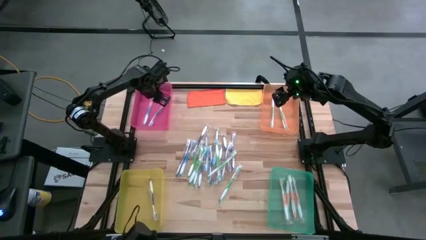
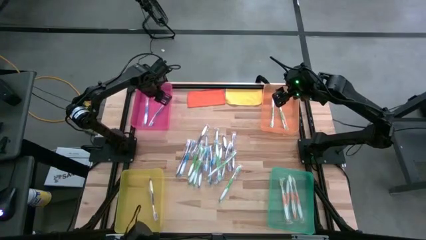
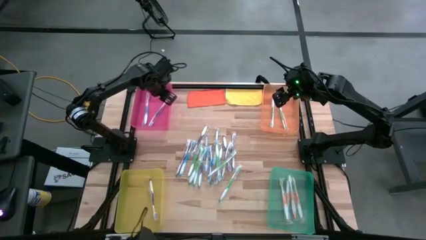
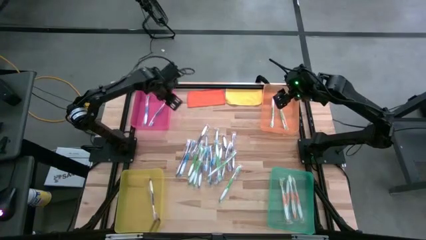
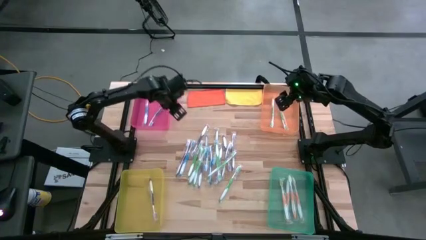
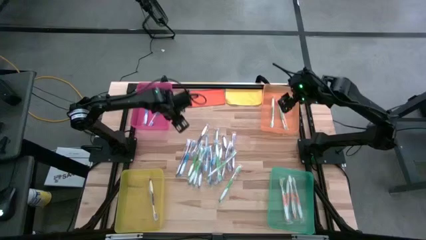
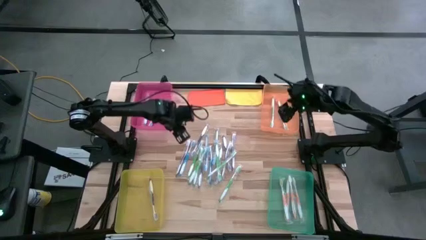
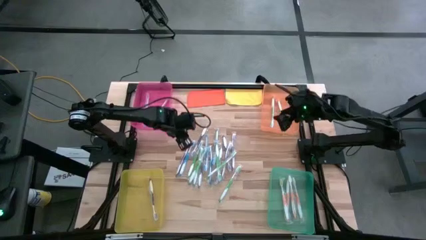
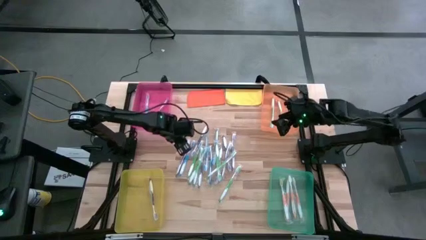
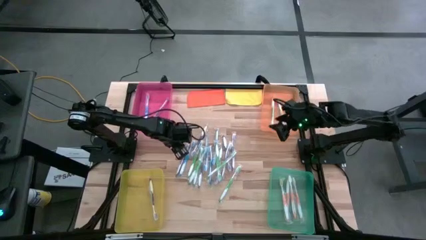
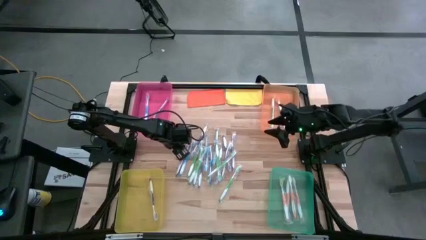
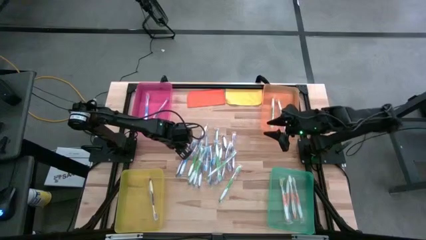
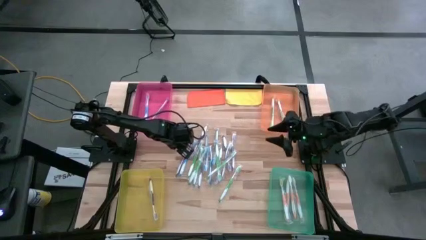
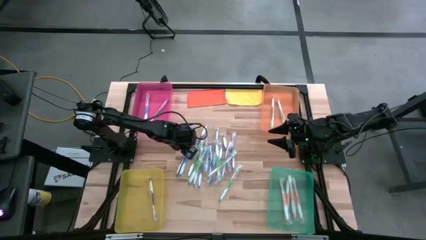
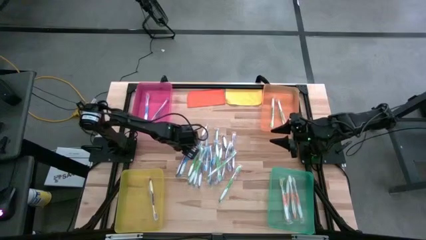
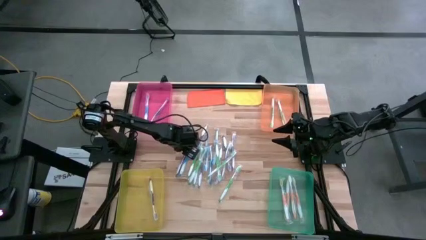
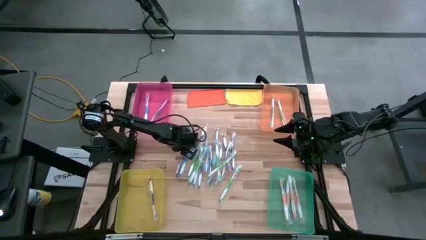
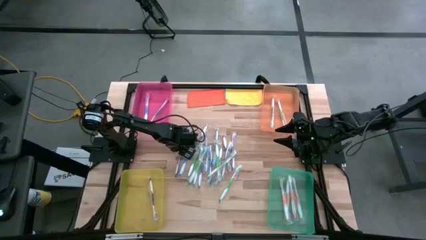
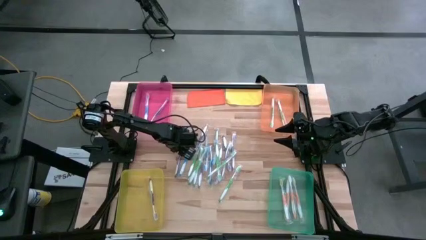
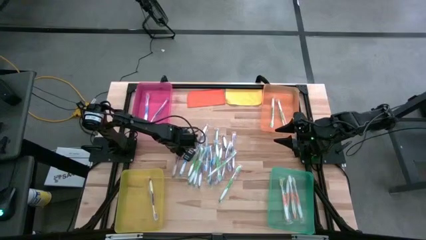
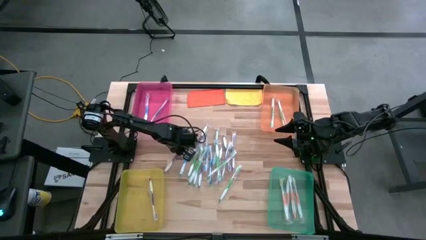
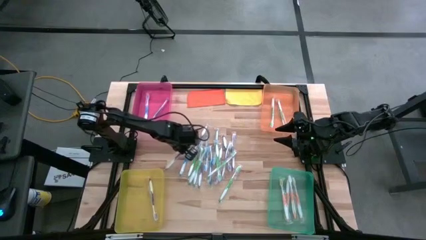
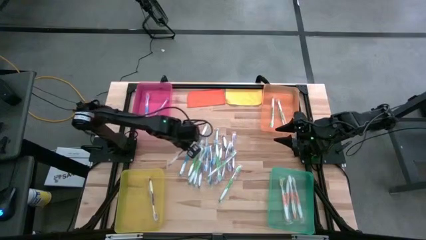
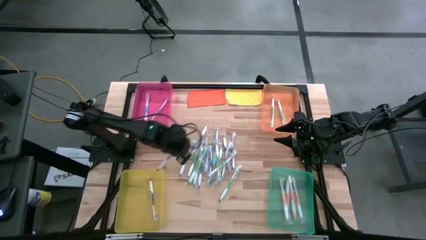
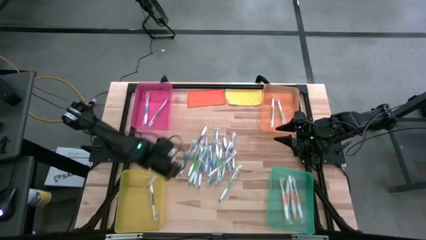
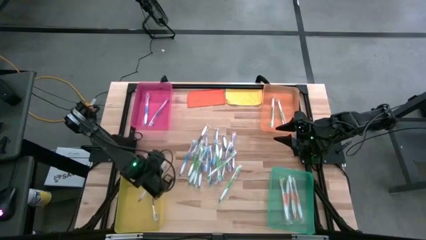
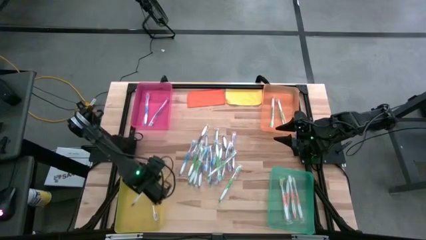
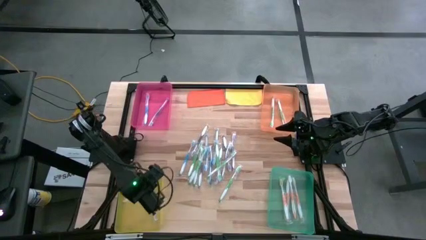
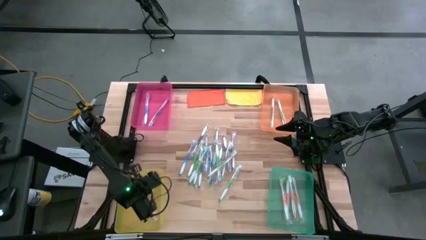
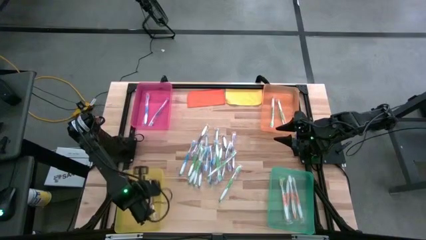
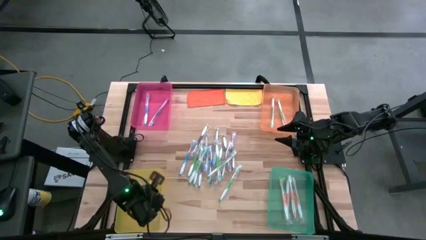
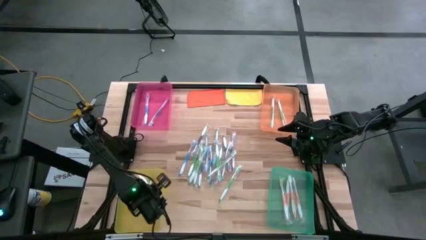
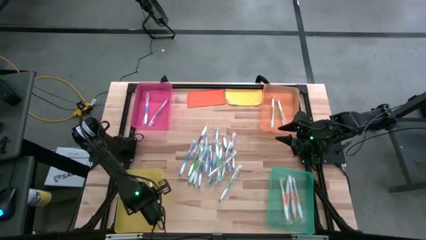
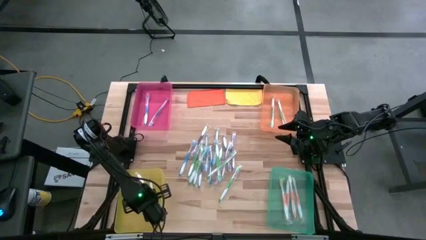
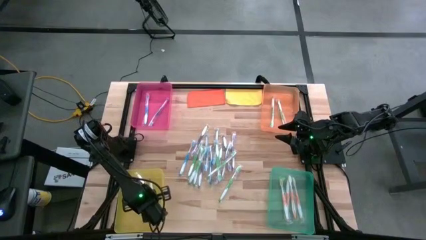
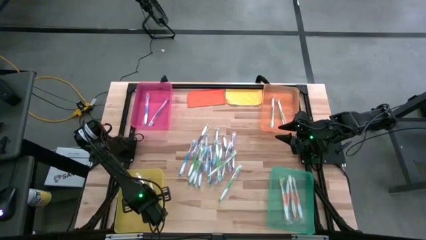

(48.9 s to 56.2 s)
Task: Pick & Place Toothbrushes
Put the purple toothbrush into the yellow bin

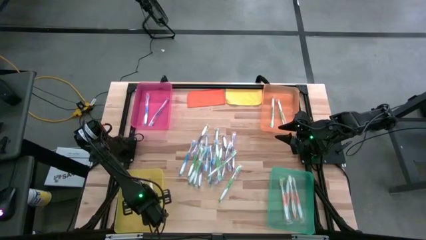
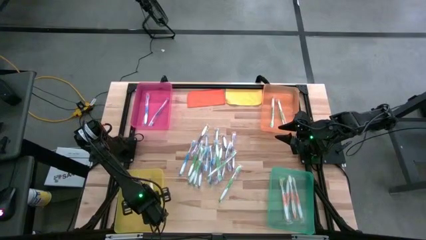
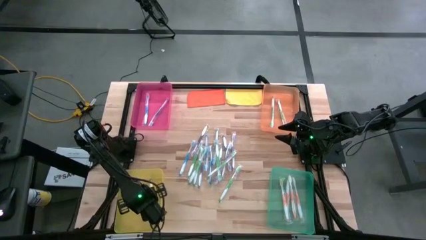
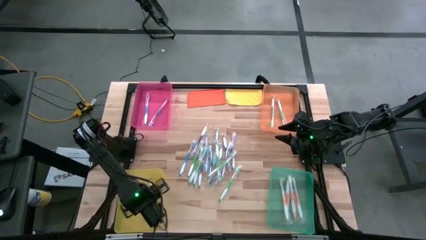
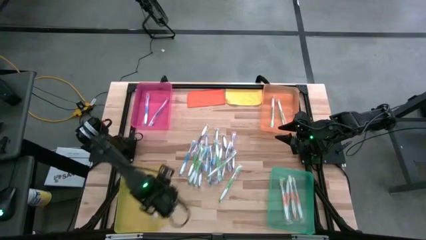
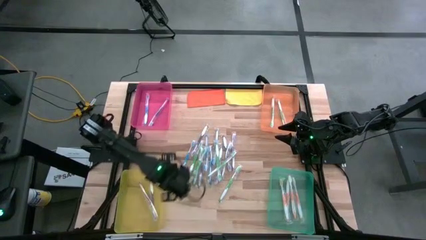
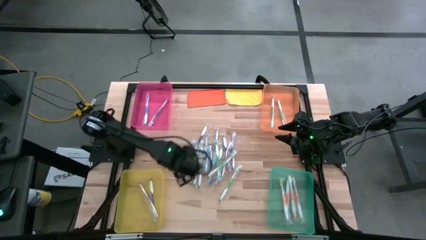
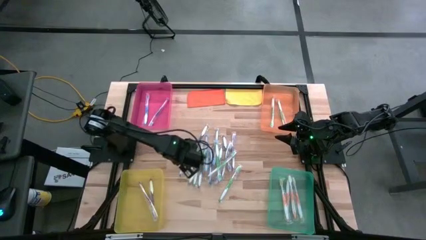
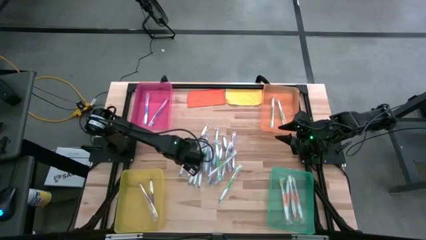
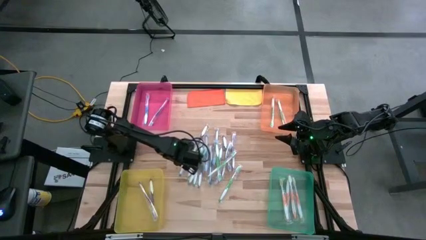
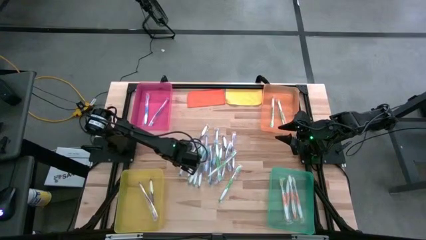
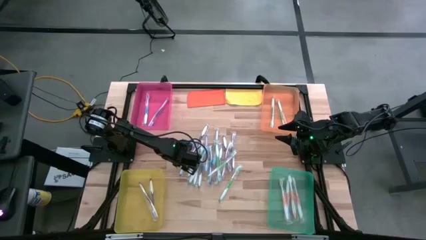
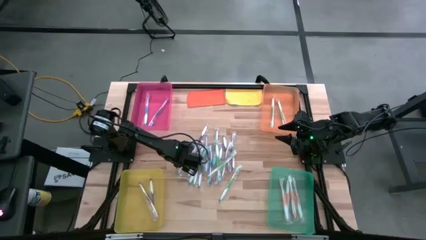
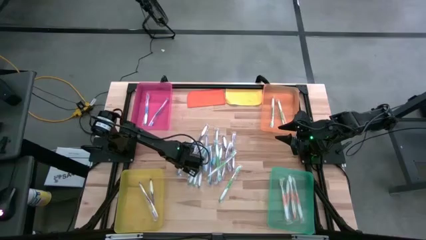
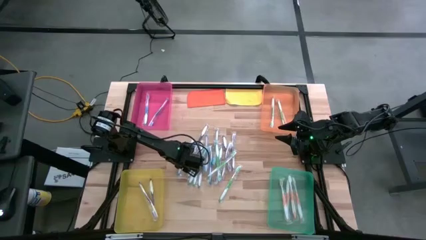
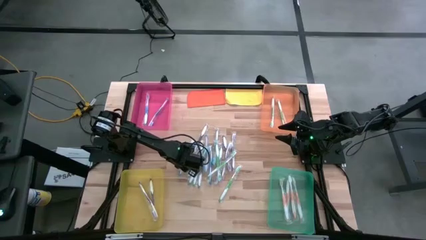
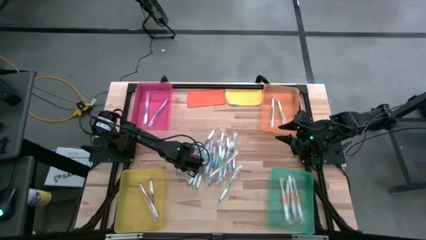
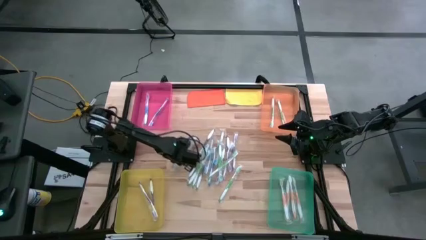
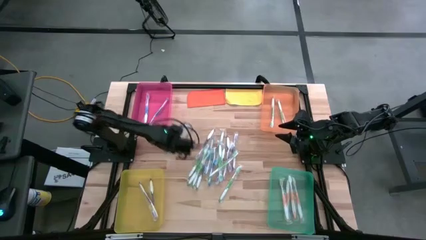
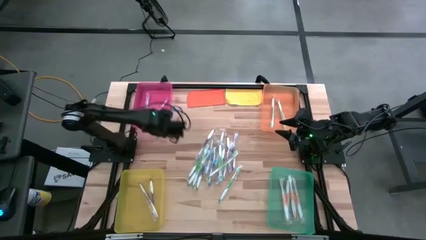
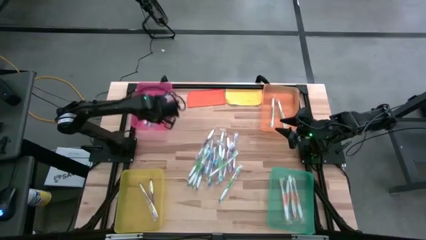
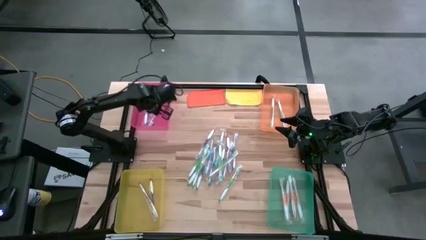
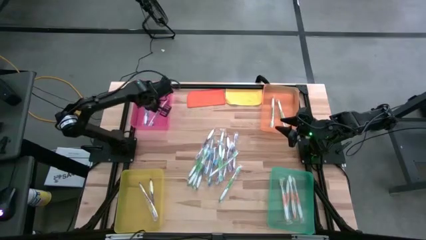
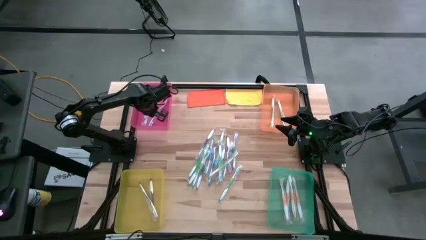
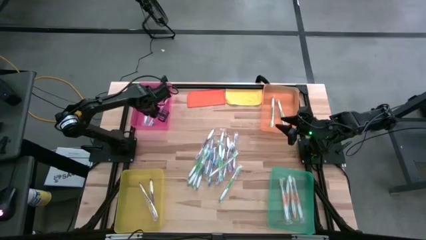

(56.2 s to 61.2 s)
Put the blue toothbrush into the red bin

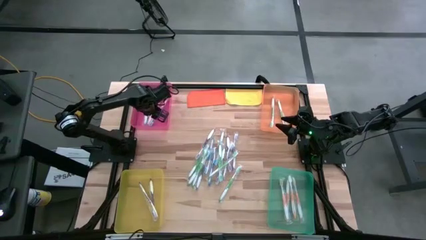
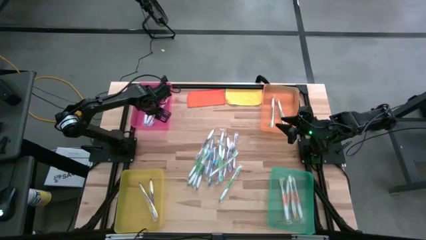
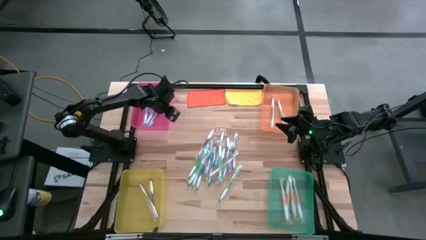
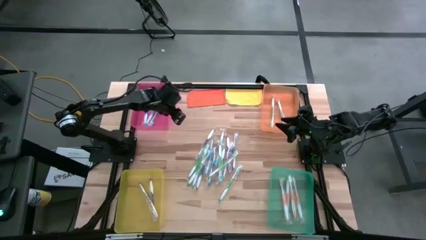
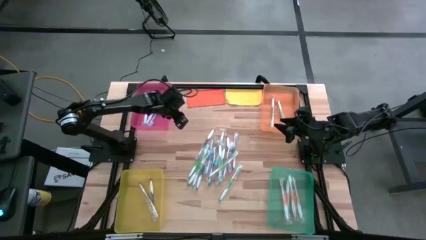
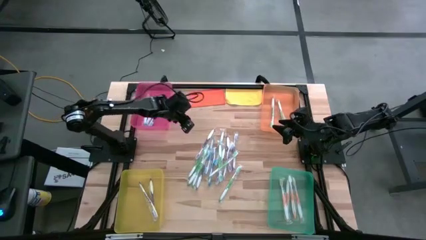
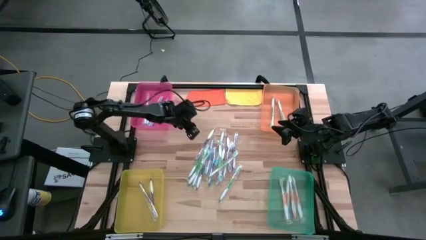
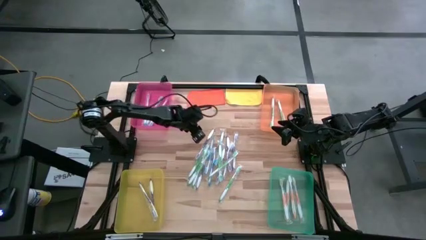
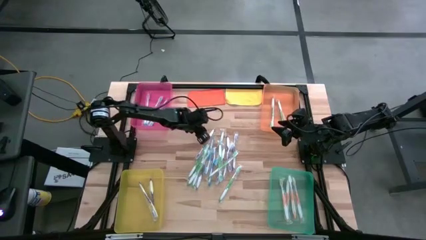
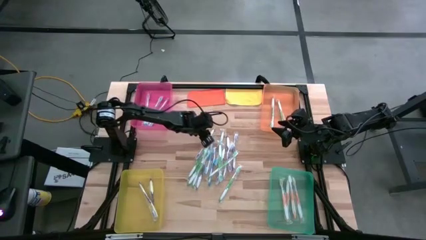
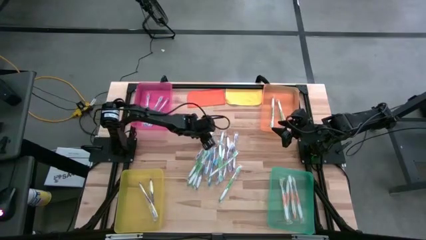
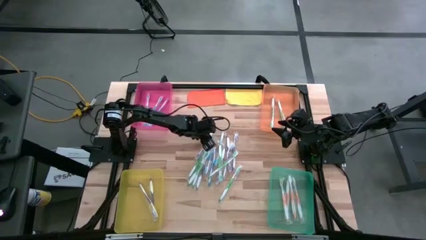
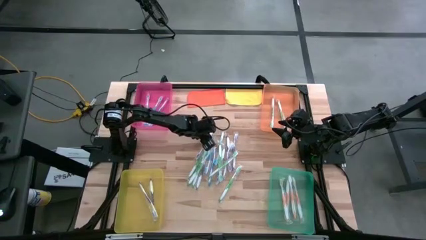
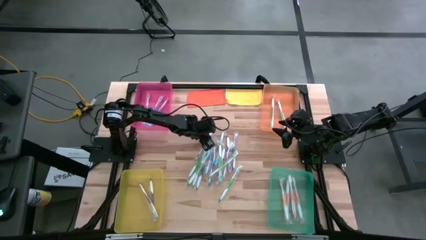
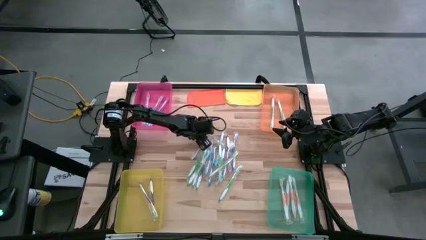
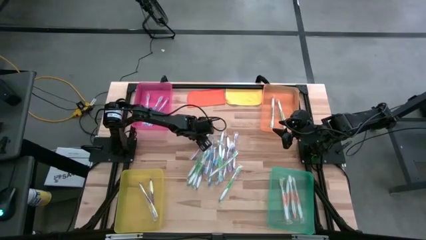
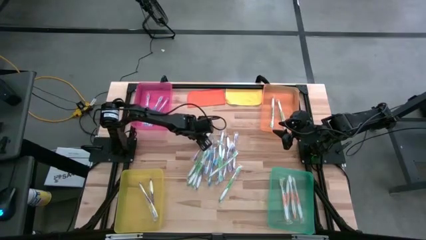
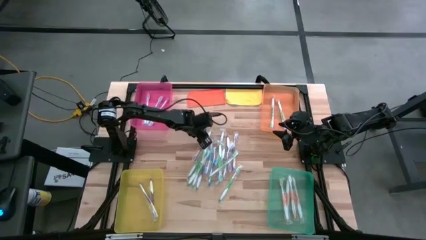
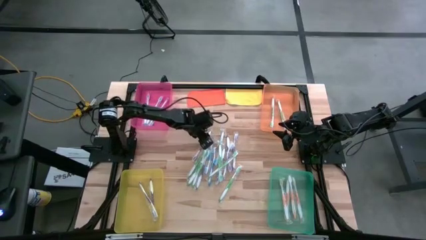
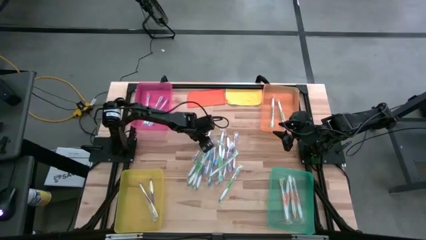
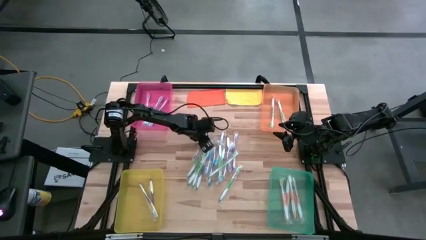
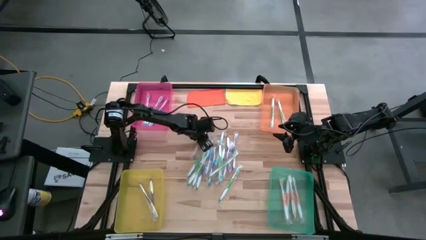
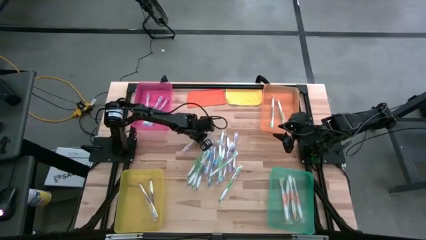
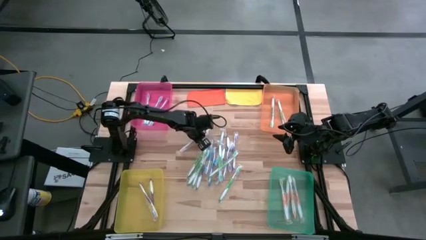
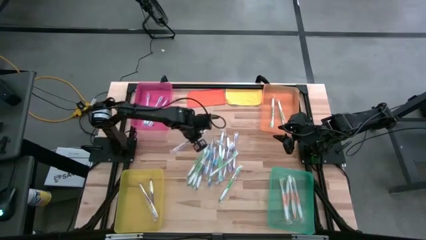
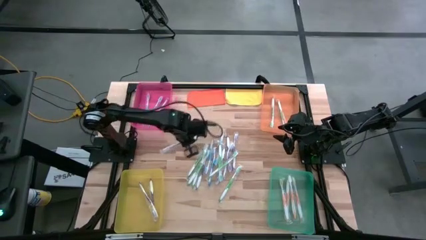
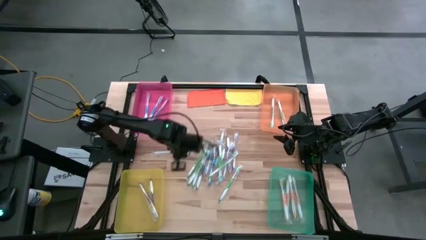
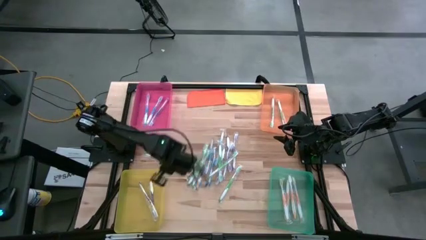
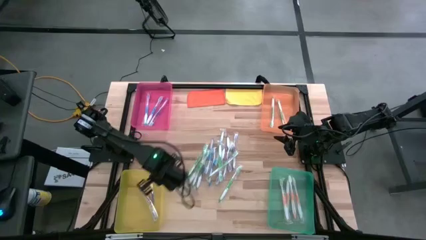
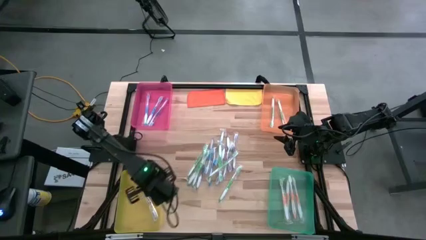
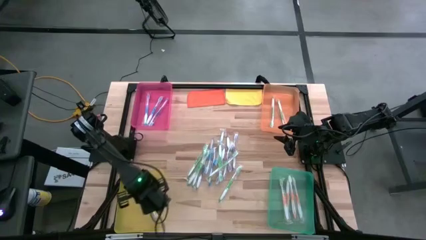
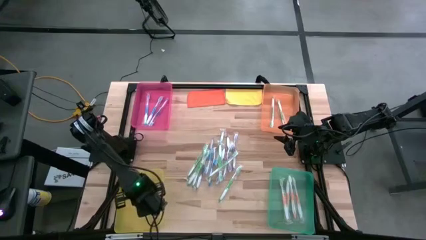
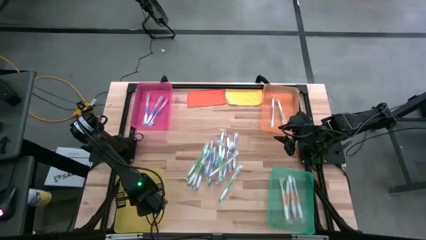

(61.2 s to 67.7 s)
Put the purple toothbrush into the yellow bin
